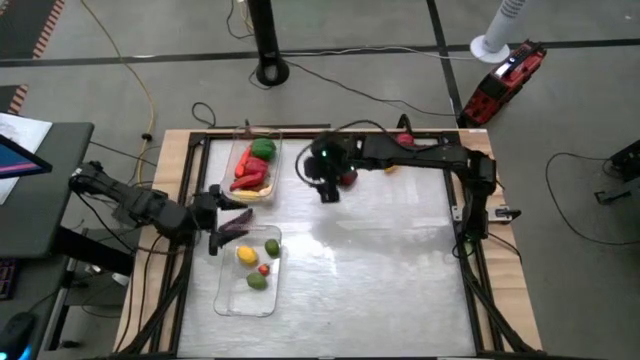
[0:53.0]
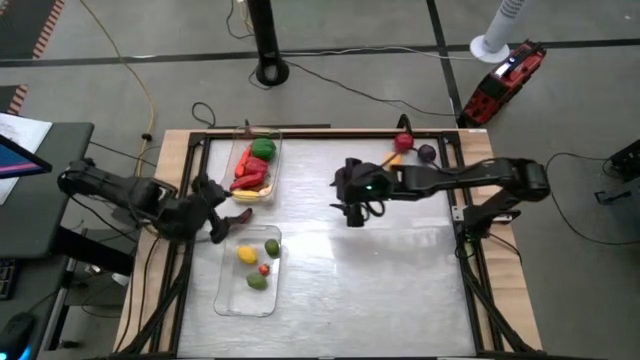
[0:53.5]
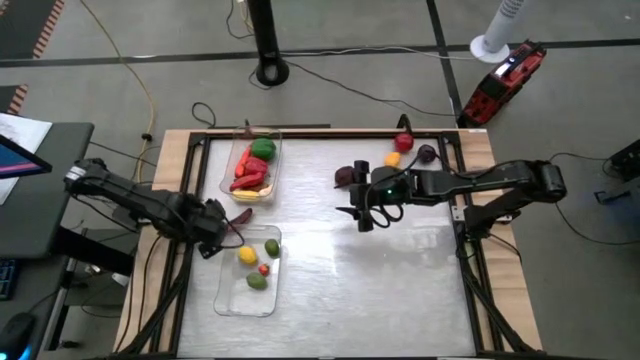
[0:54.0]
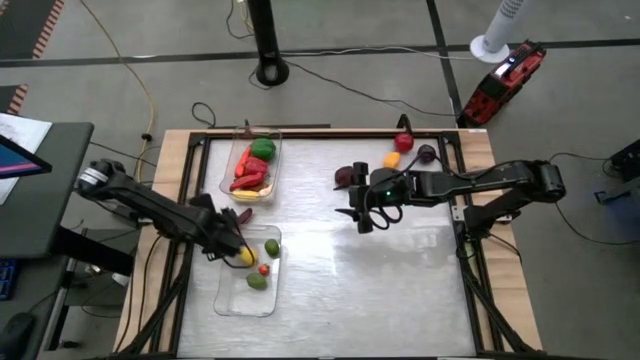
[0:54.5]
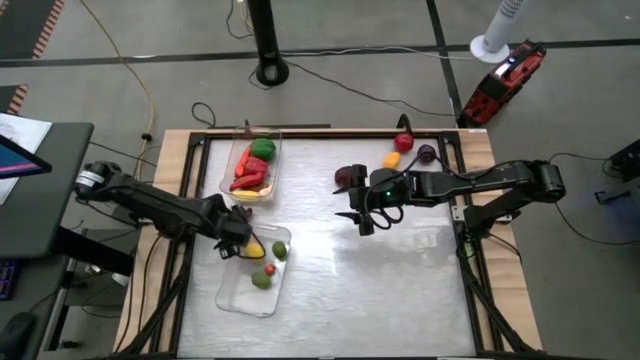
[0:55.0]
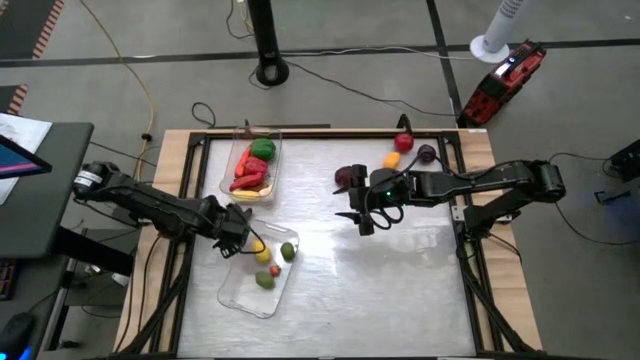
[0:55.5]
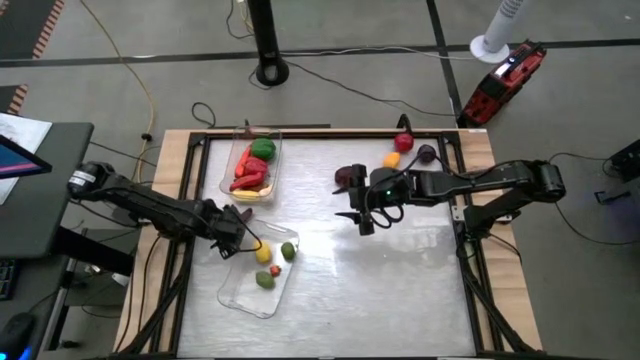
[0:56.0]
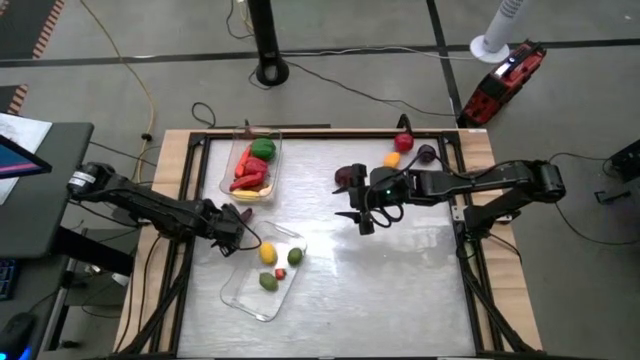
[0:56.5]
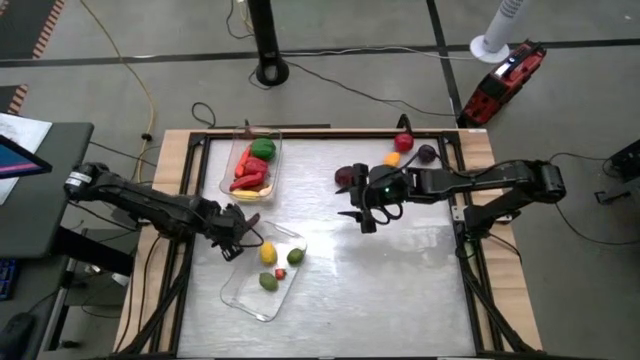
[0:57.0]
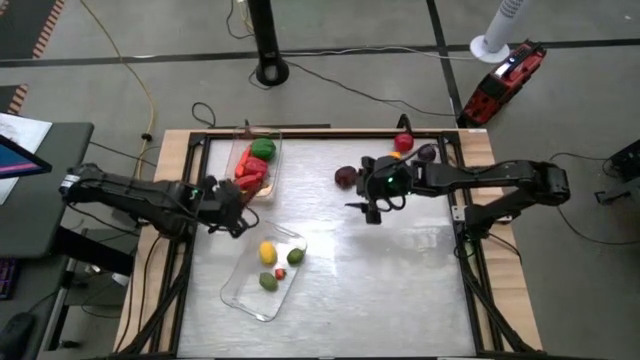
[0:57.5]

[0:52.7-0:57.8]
Task: Sort produce into baskets
Put the red chili pepper into the top transparent bin

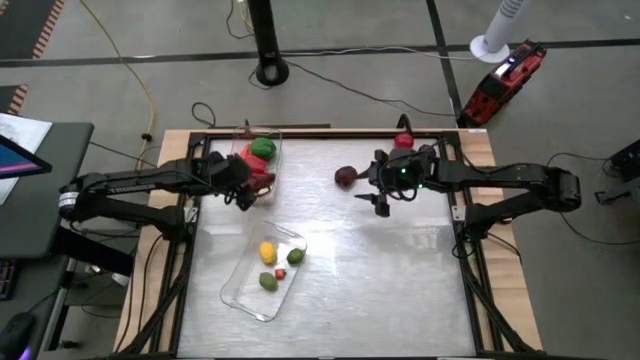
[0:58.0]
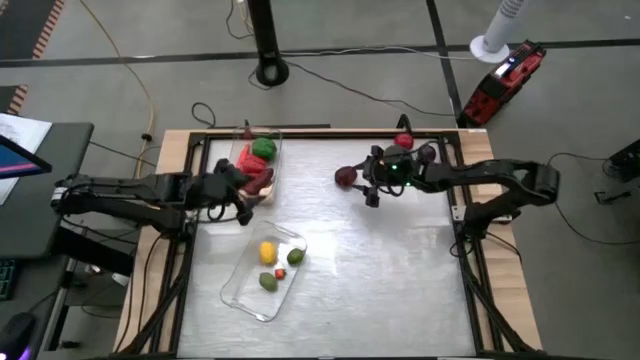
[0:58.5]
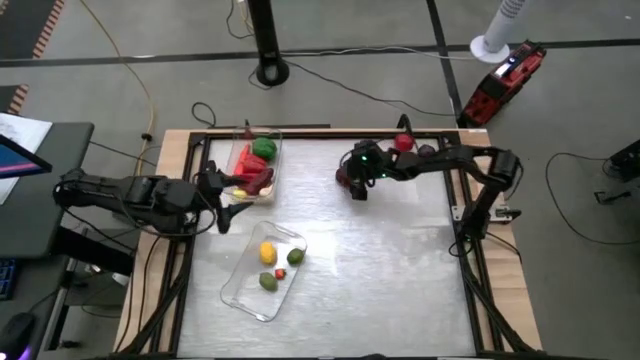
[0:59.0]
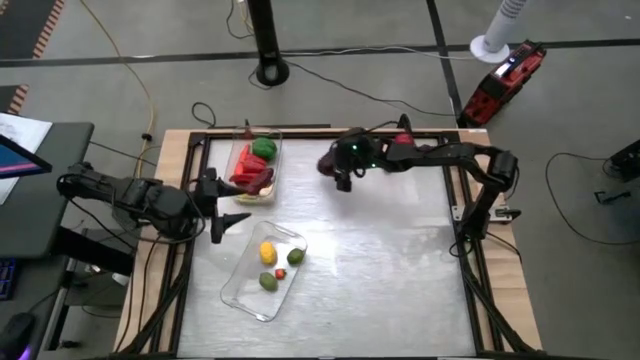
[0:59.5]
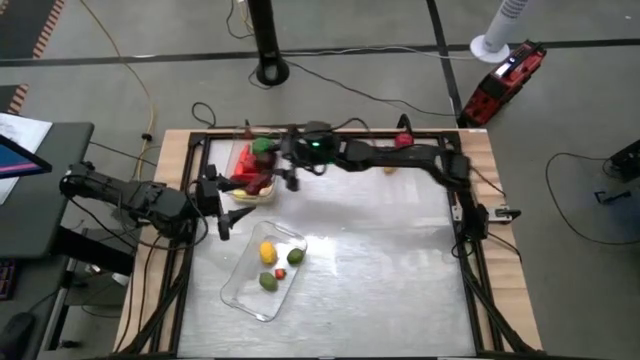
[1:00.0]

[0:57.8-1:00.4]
Put the left apple into the bottom transparent bin

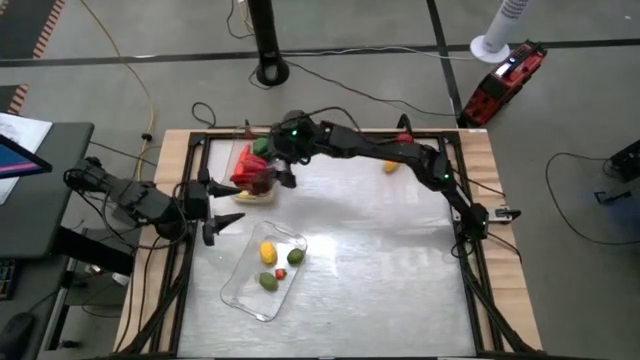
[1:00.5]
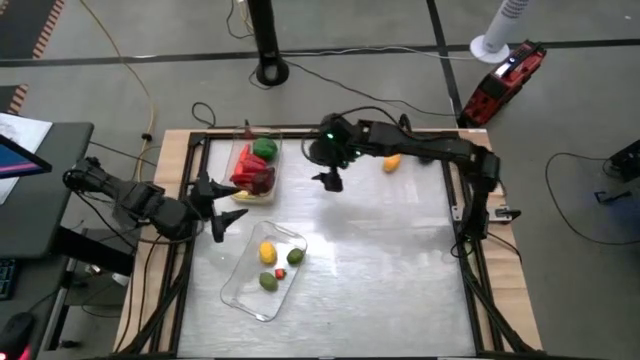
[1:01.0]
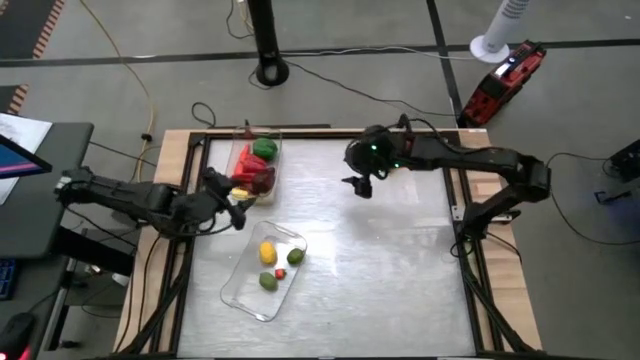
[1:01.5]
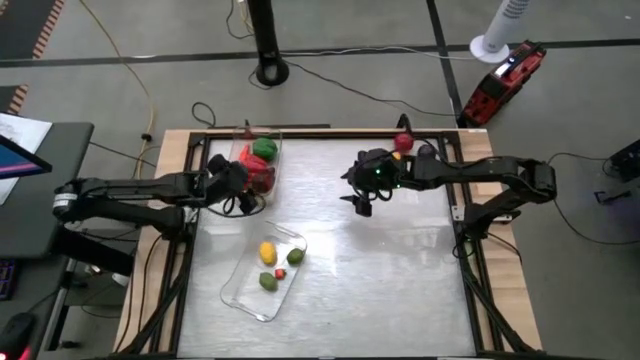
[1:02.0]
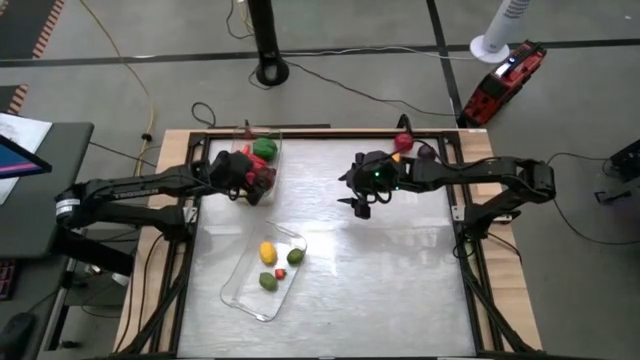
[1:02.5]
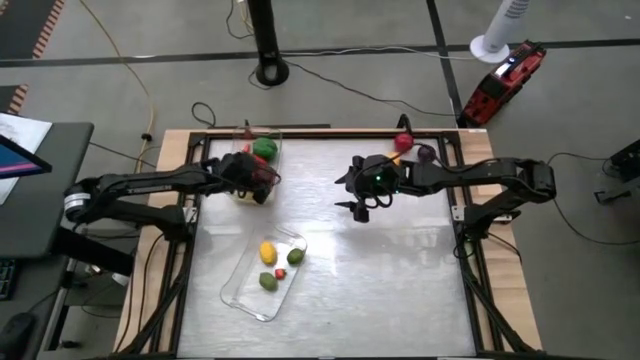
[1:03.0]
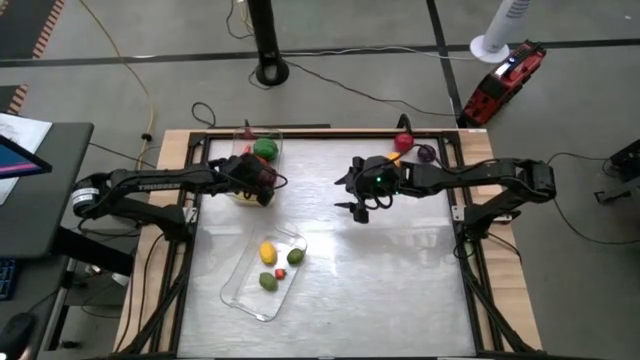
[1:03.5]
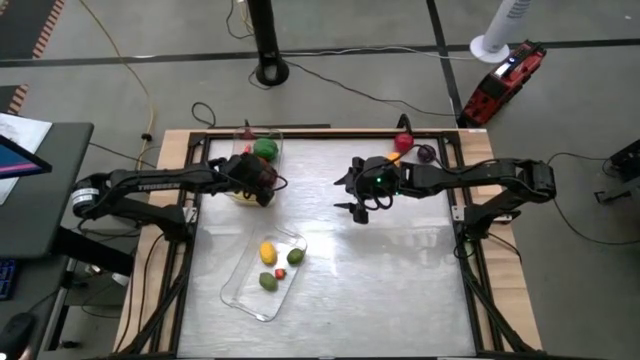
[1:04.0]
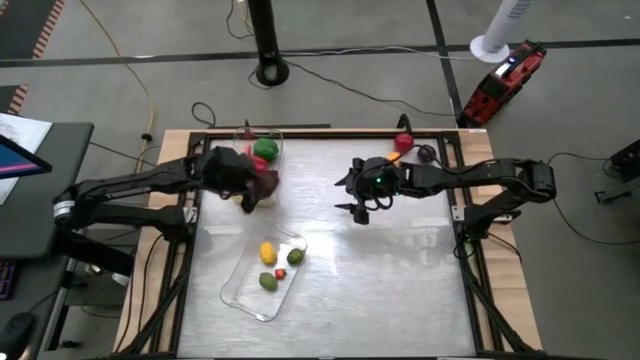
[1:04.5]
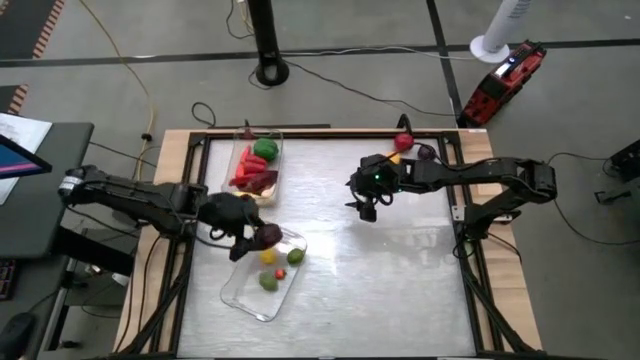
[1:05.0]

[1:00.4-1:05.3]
Put the left apple into the bottom transparent bin

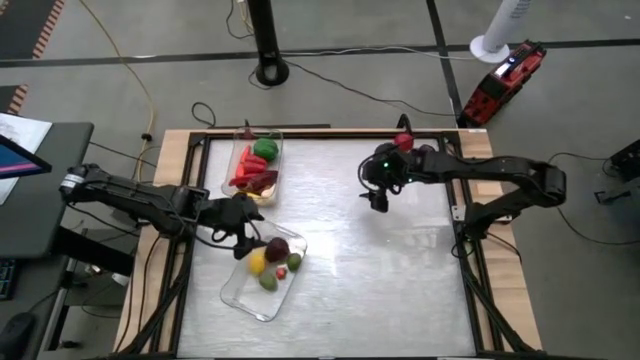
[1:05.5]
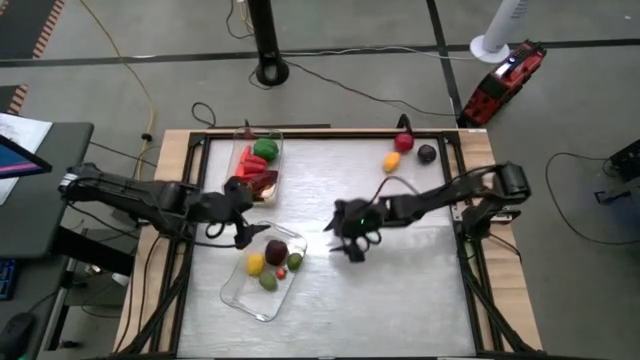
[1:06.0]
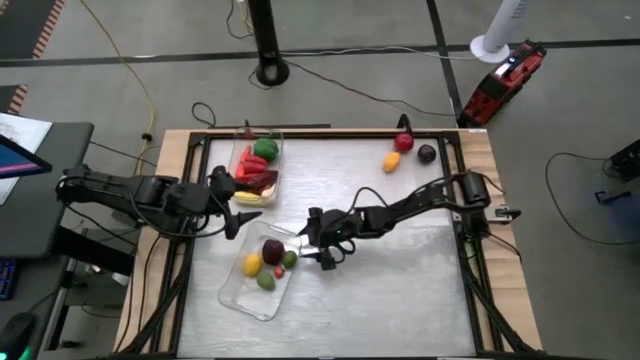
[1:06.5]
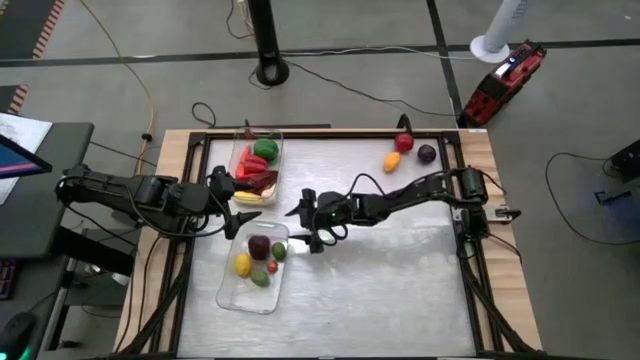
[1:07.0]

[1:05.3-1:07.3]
Adjust the bottom transparent bin

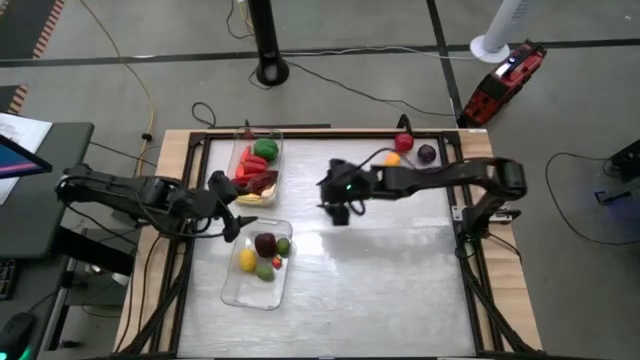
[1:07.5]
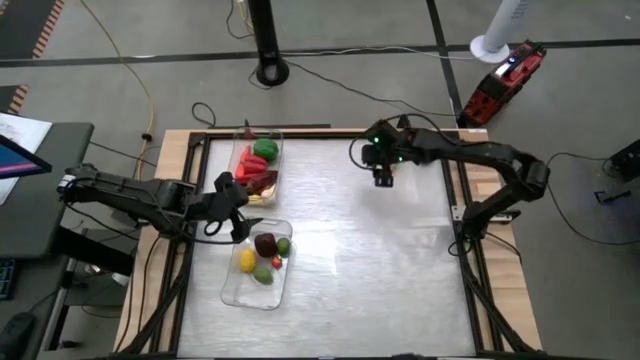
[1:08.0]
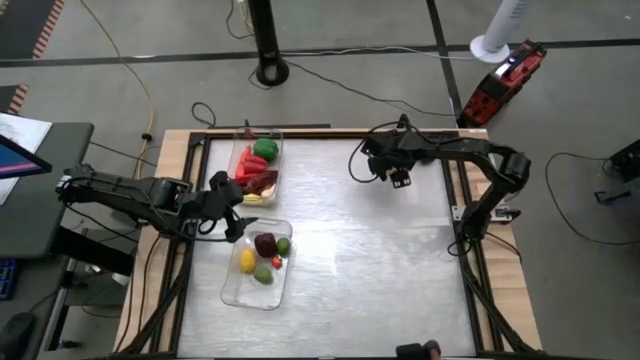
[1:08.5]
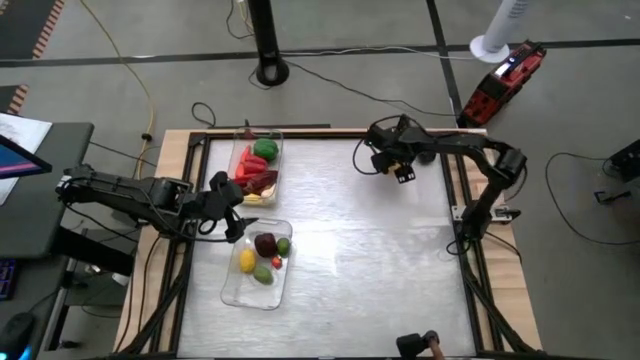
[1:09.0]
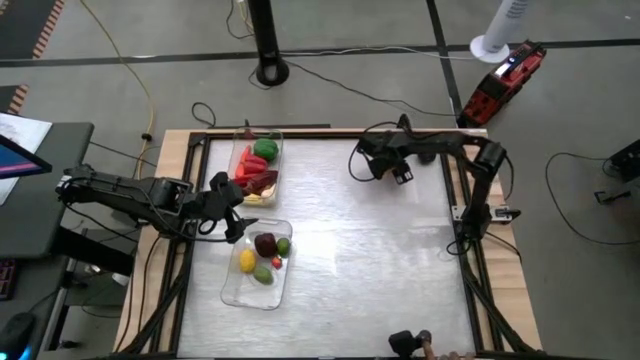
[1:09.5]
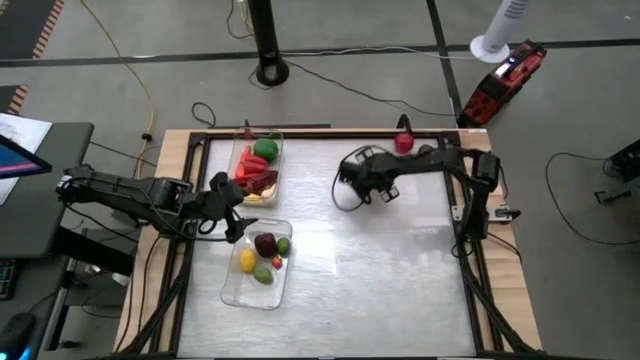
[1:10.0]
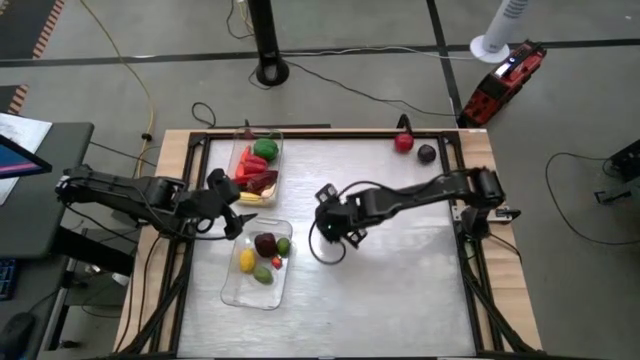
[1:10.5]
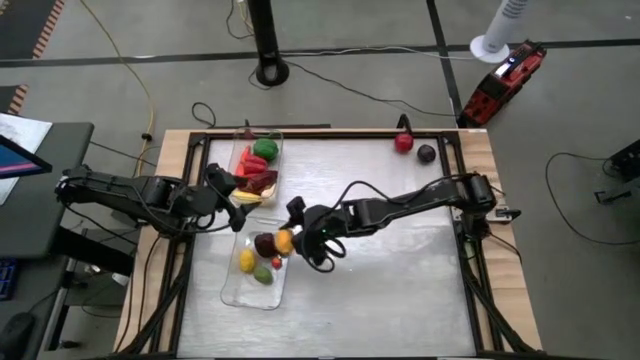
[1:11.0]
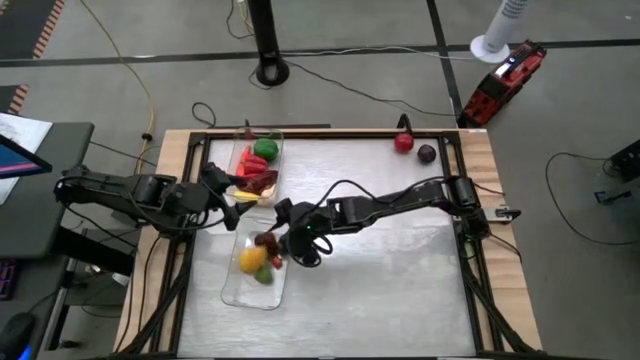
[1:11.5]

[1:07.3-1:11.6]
Put the yellow lime into the bottom transparent bin

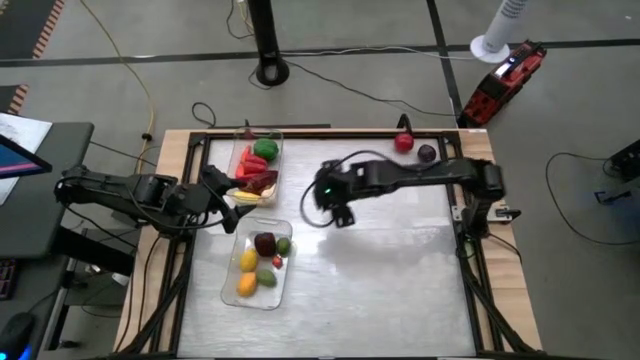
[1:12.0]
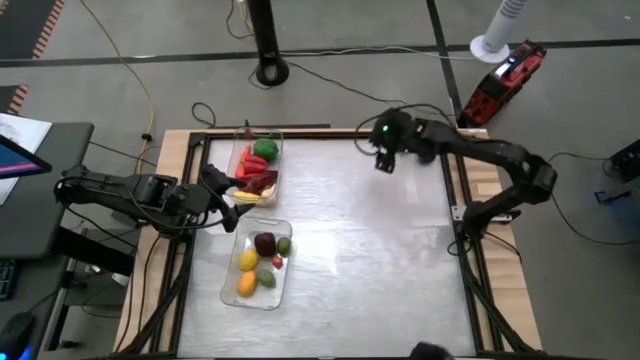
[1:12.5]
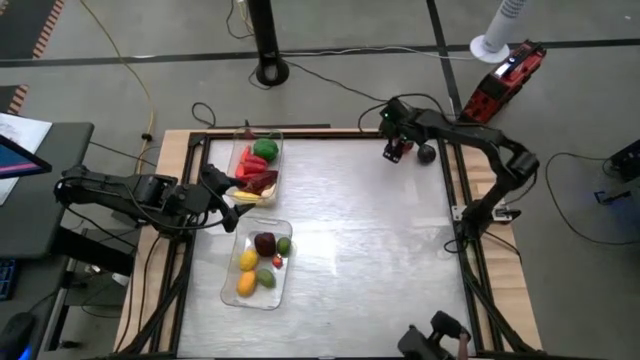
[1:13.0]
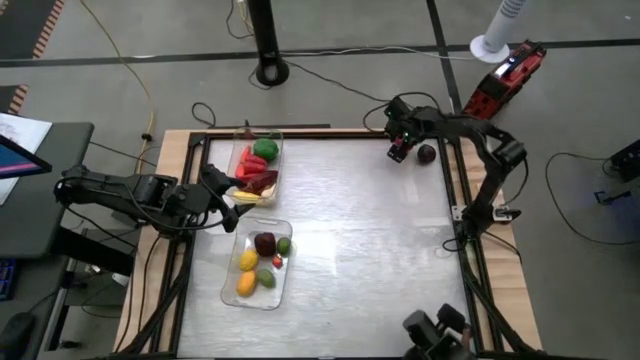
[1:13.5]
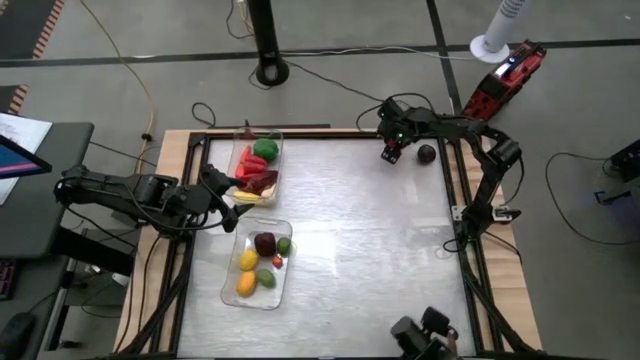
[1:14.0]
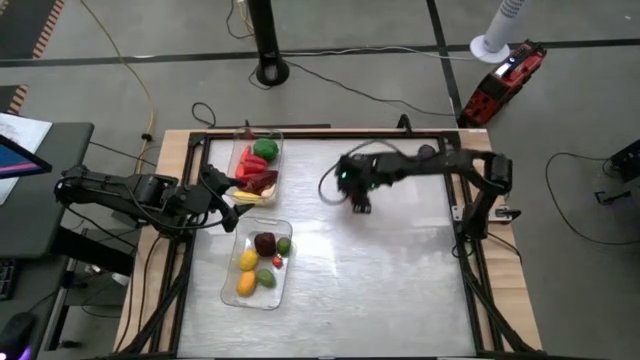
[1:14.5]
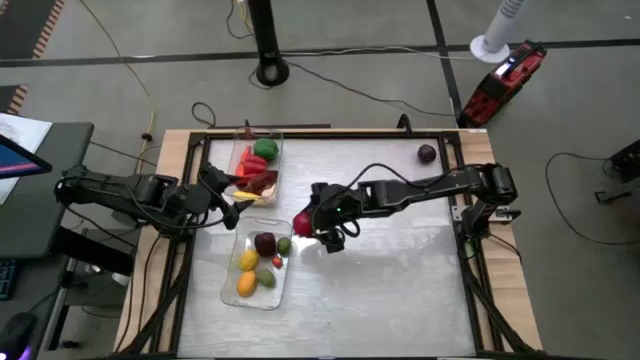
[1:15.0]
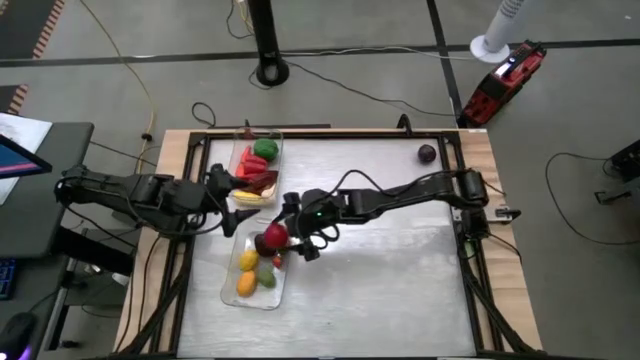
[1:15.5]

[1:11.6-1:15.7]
Put the tomato into the bottom transparent bin
